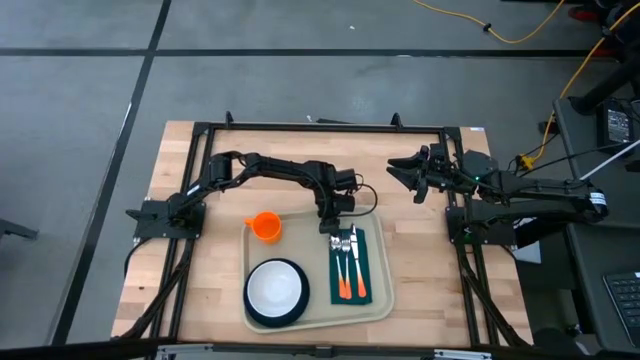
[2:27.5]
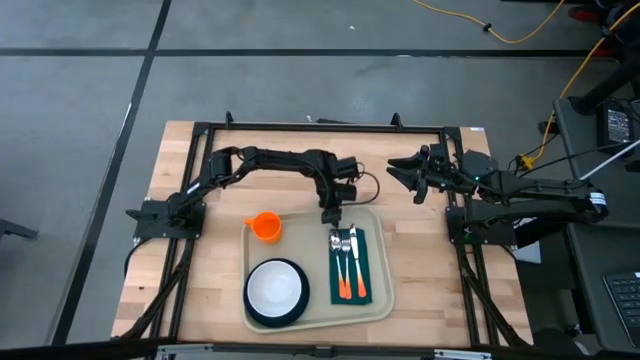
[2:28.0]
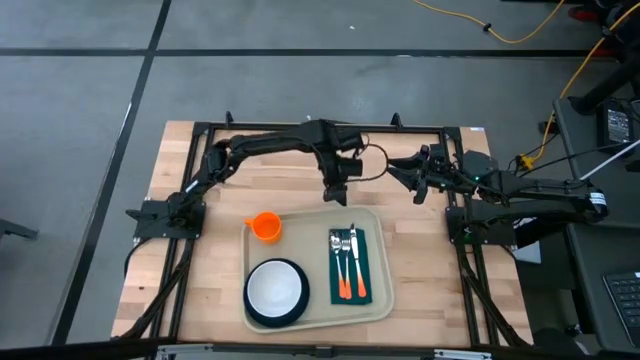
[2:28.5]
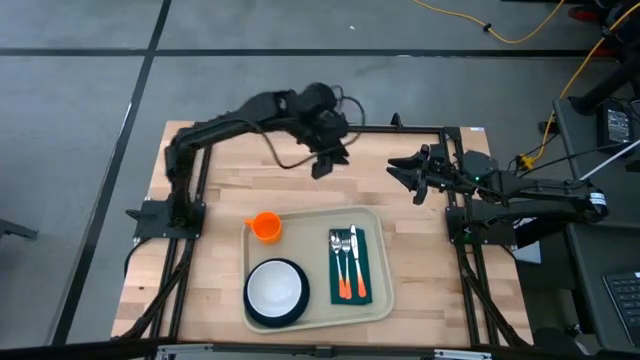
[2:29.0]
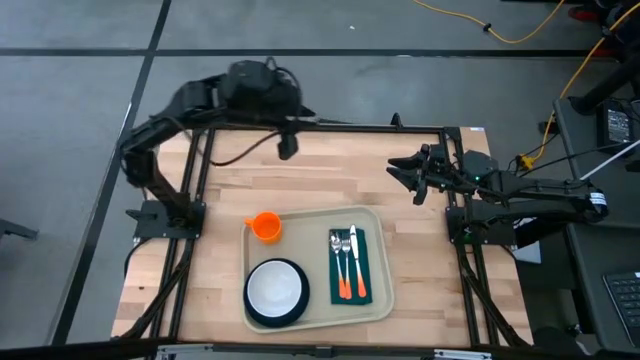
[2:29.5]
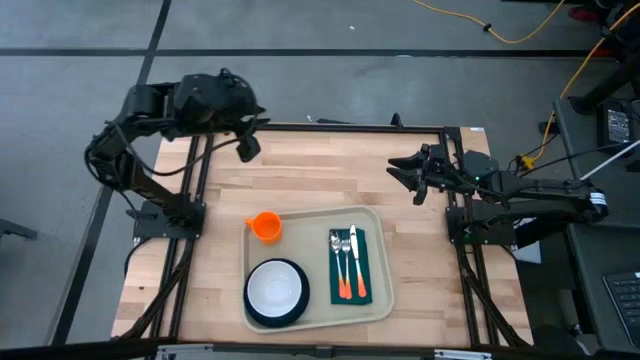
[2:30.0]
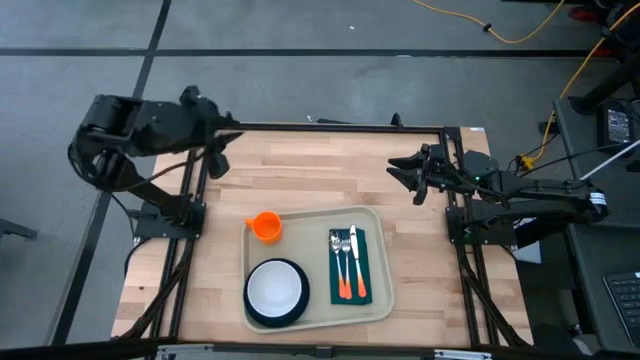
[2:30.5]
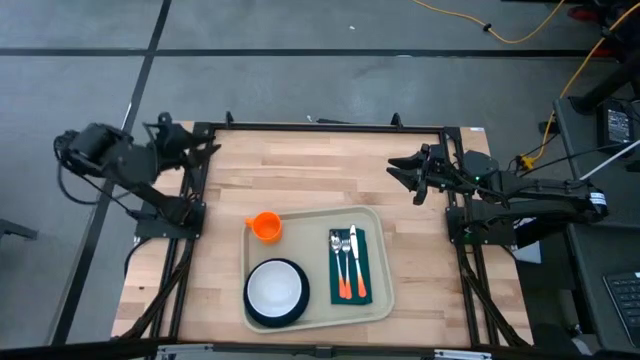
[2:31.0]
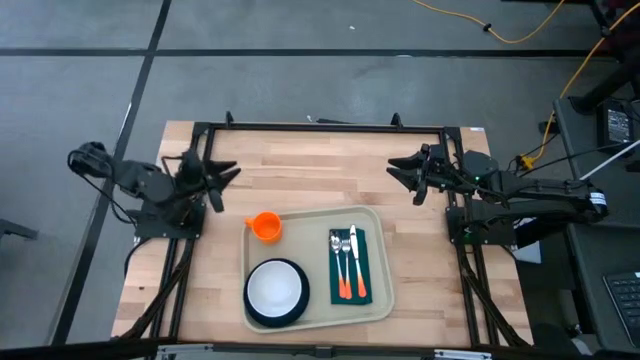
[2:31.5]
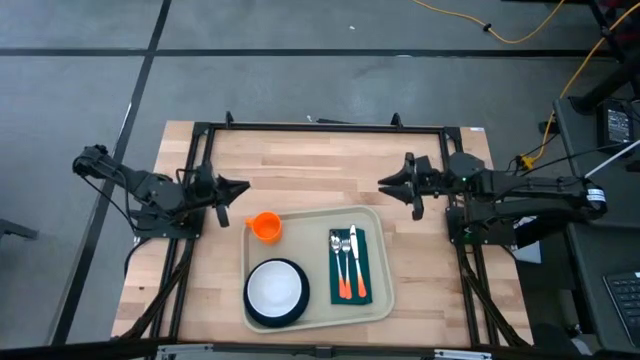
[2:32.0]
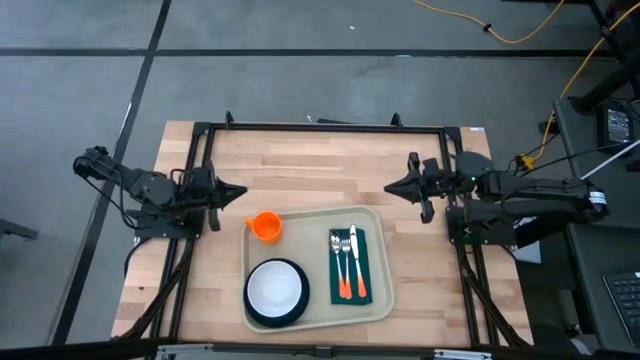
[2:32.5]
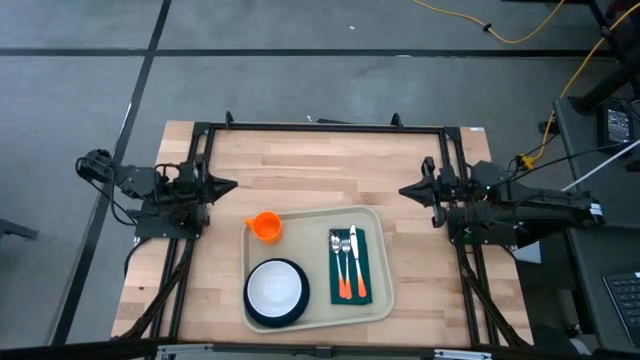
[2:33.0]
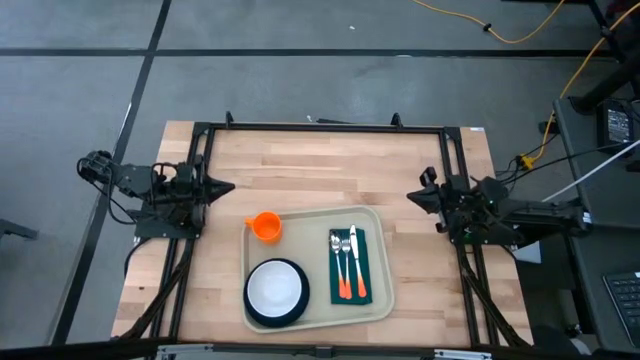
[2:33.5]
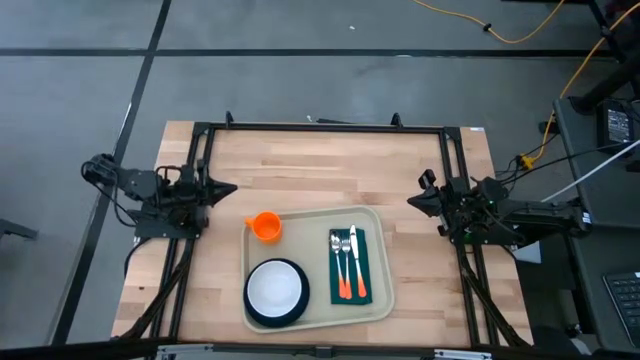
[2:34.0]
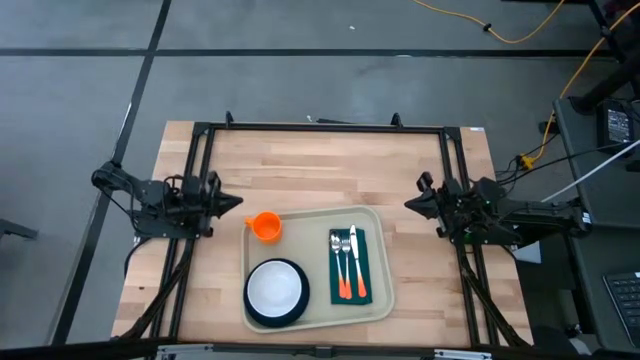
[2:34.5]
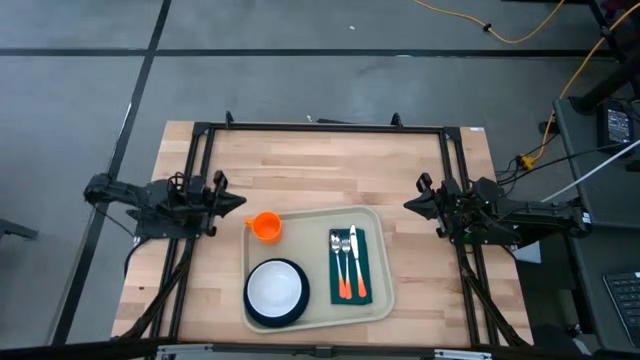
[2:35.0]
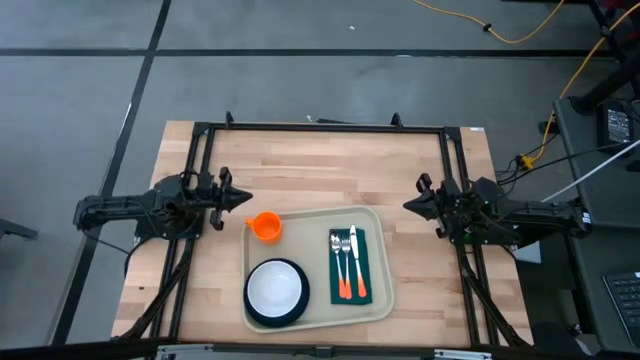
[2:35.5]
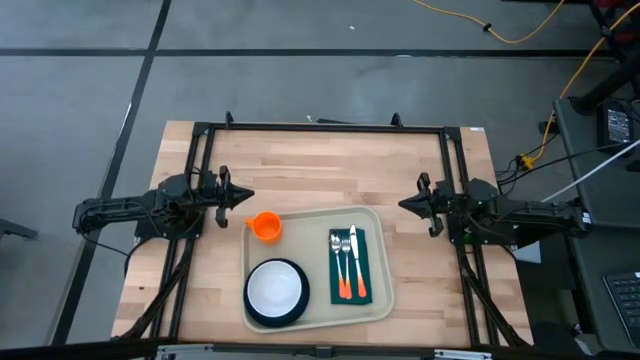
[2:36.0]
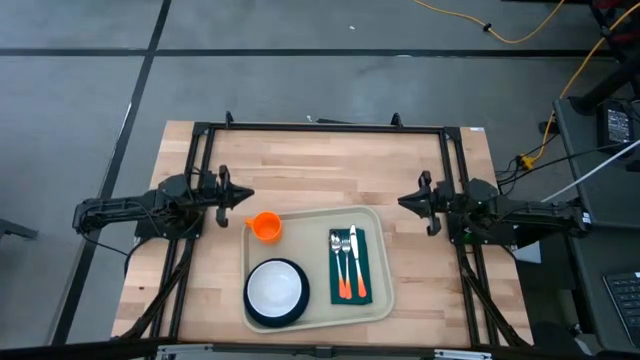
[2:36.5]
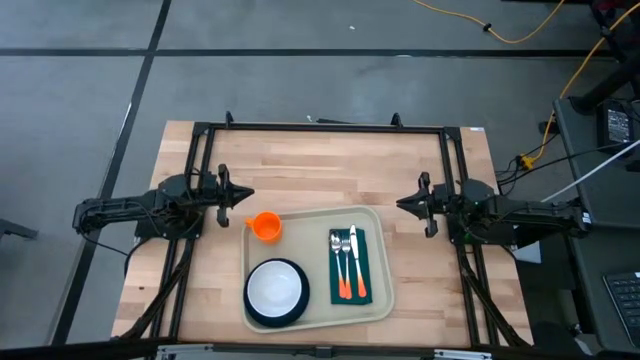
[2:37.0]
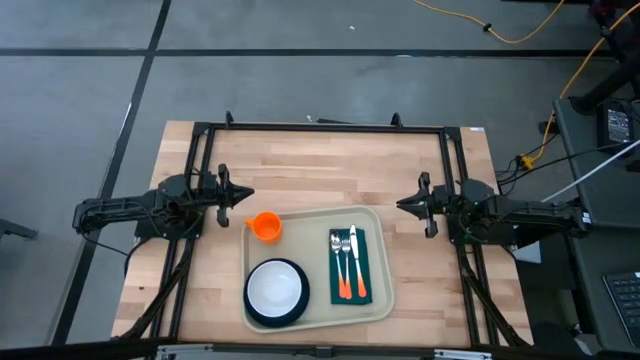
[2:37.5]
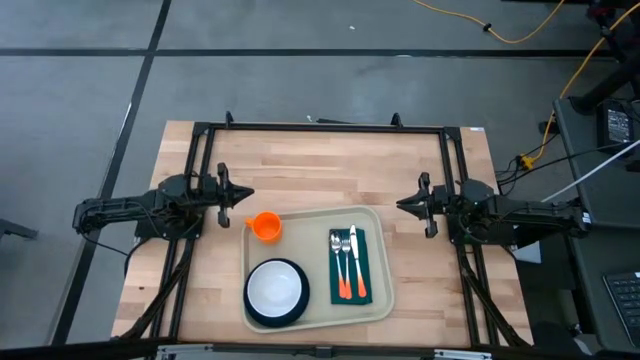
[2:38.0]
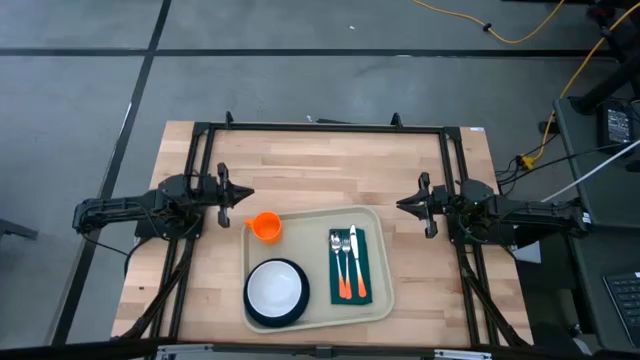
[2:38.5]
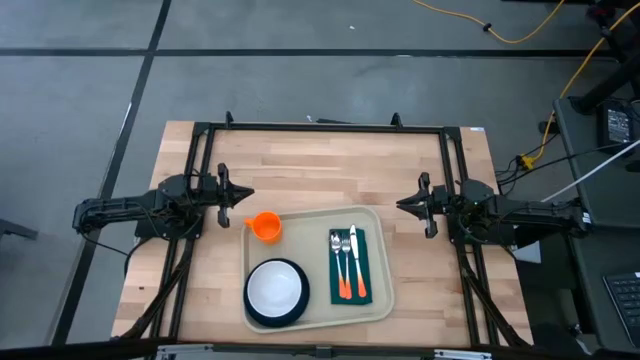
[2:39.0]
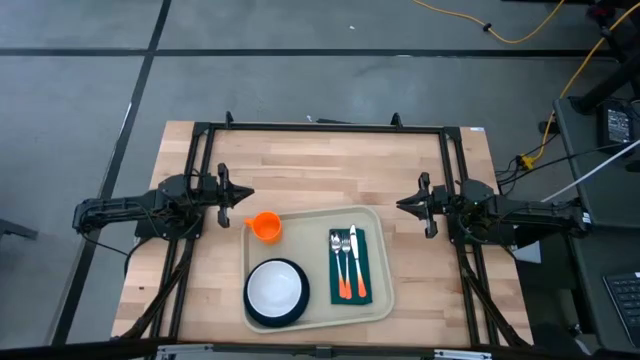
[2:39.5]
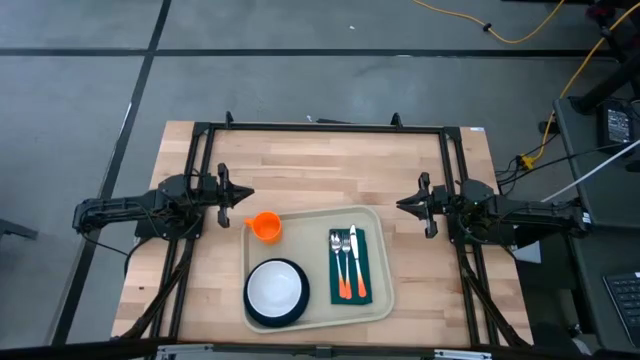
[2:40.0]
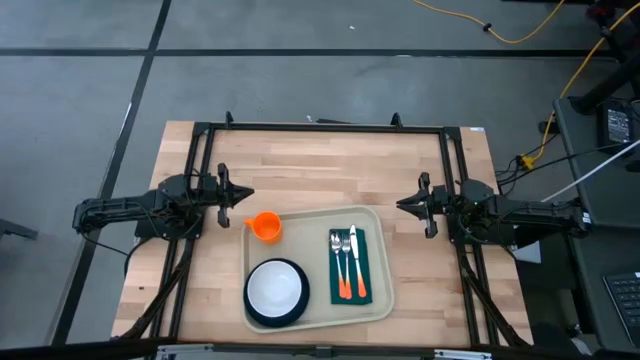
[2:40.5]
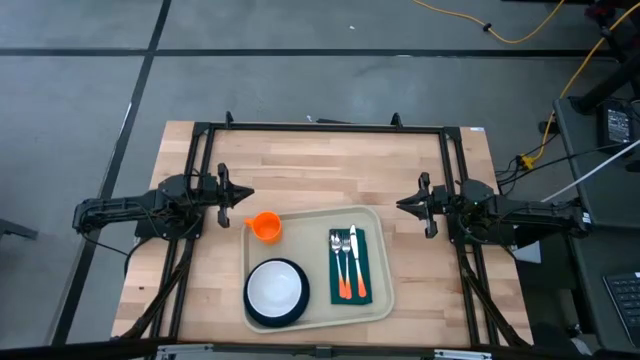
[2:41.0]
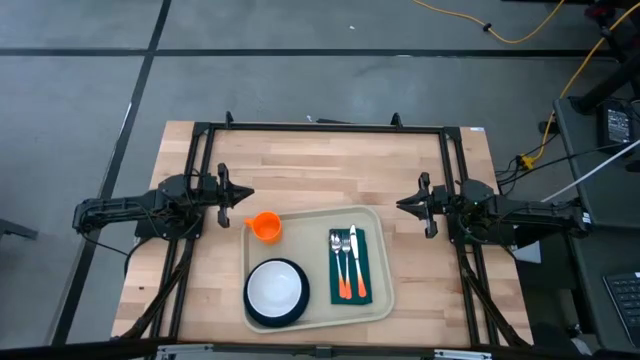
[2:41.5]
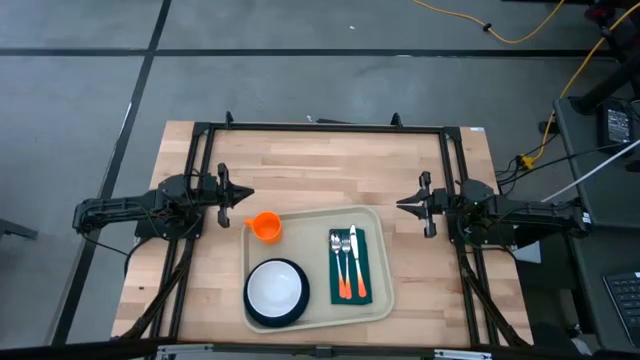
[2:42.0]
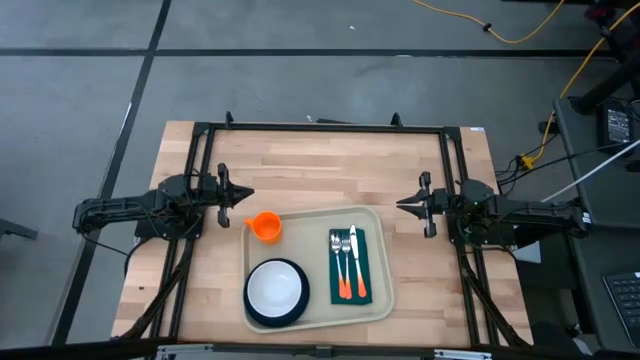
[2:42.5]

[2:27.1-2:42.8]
Task: Set up tray
Return to Home Position

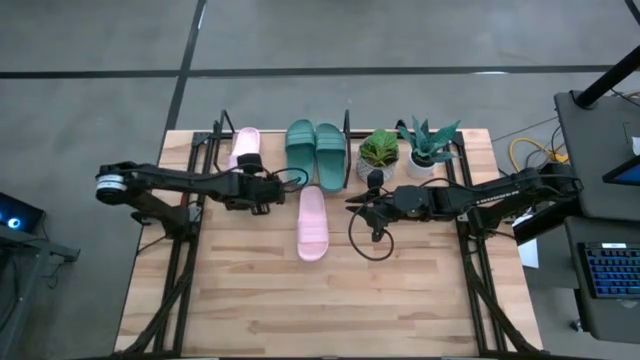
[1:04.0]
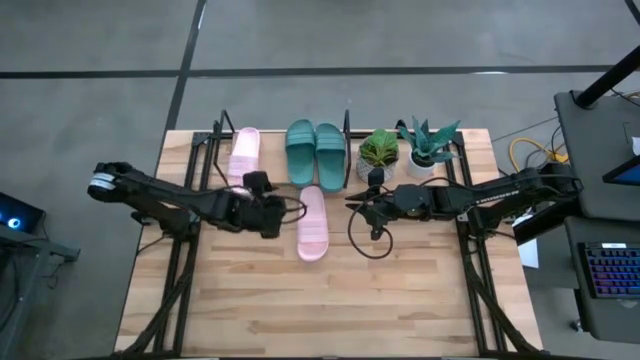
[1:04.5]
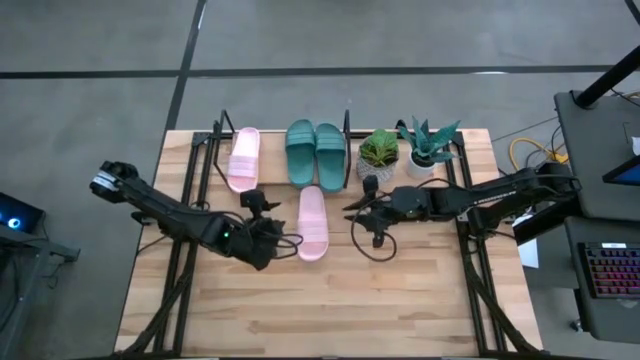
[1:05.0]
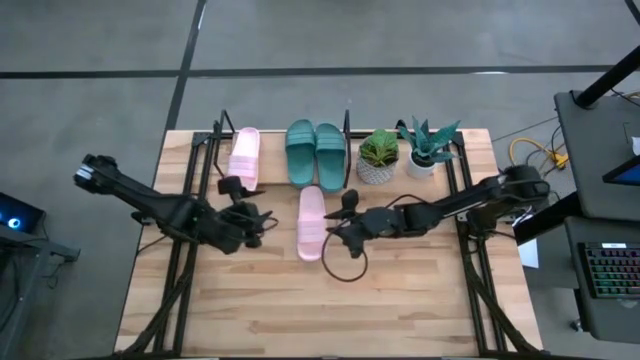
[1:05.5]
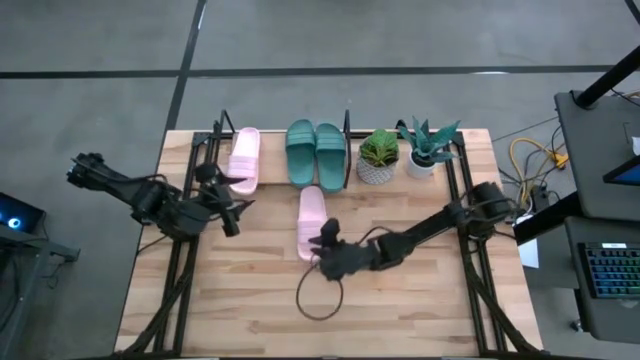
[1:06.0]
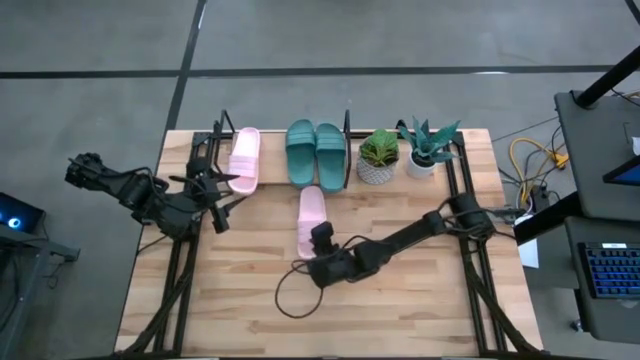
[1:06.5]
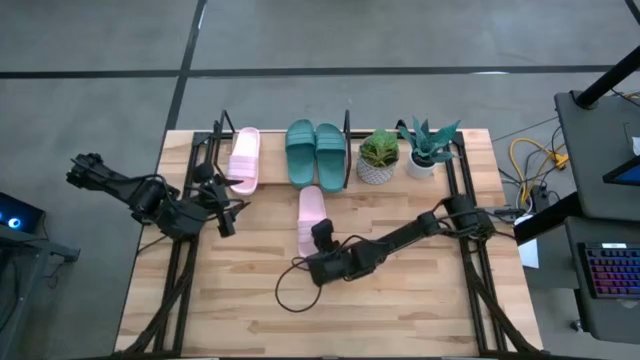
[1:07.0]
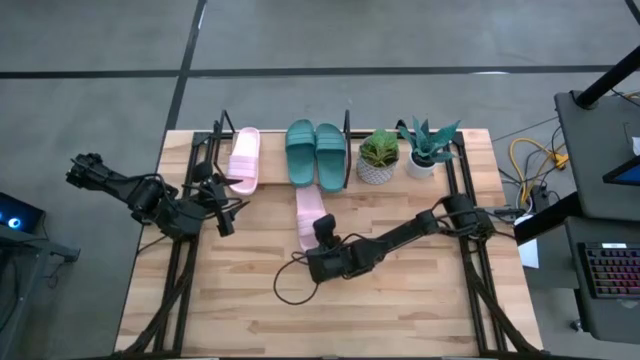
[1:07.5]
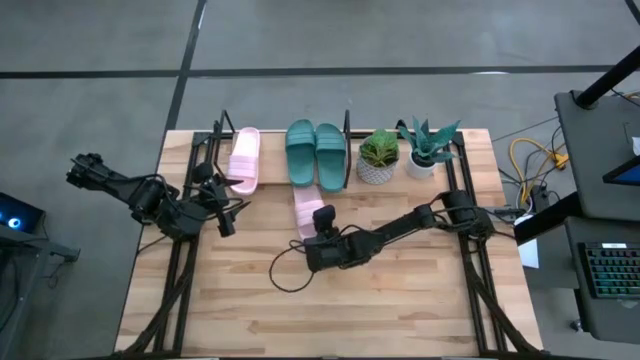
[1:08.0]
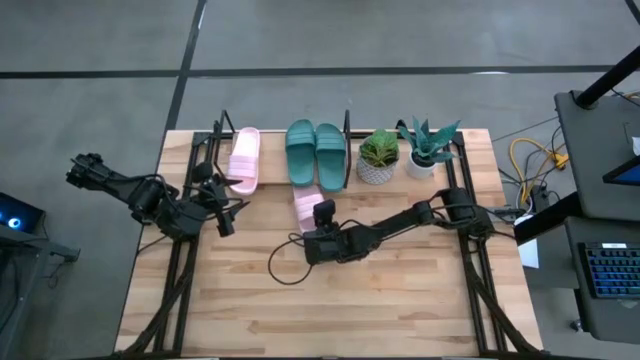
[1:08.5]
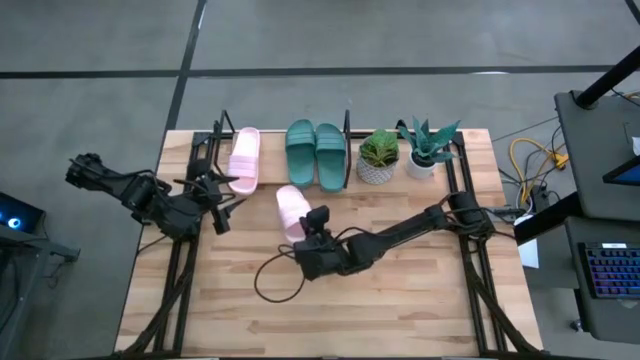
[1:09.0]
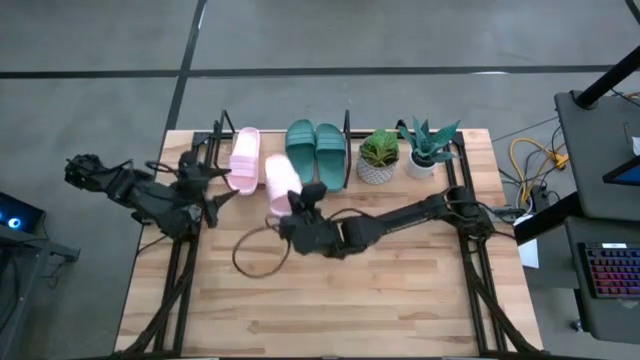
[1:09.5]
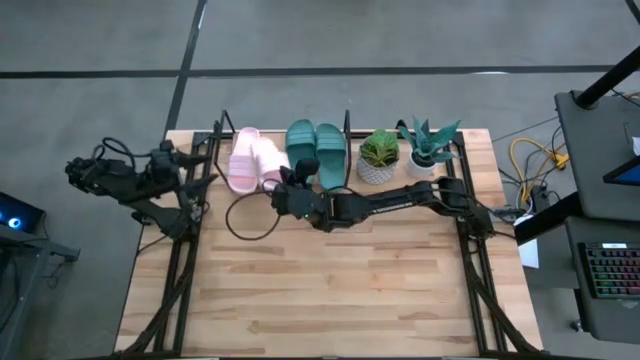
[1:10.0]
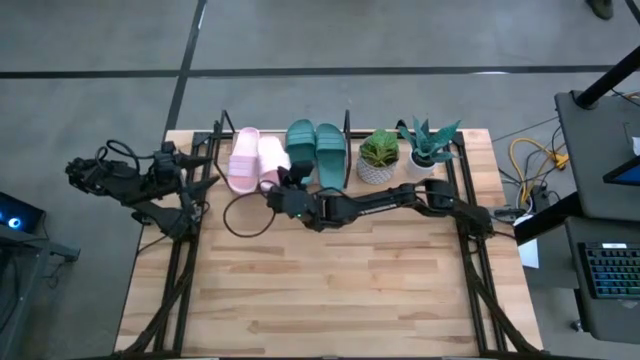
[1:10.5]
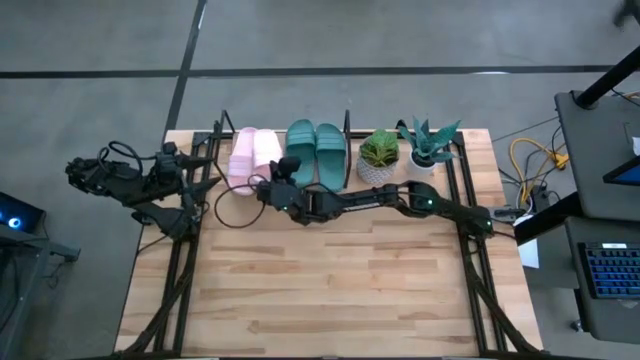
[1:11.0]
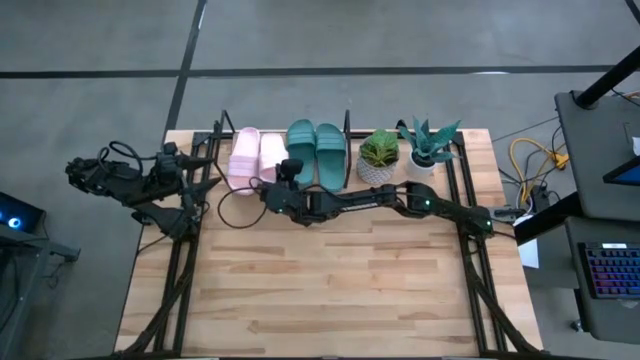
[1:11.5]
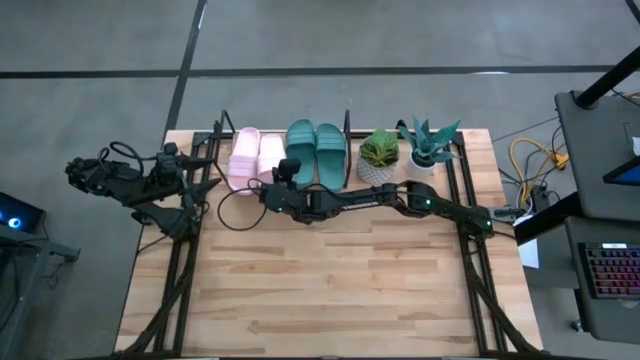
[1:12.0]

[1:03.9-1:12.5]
Task: Pick and place slides into the shelf
Put the pink slide into the shelf
